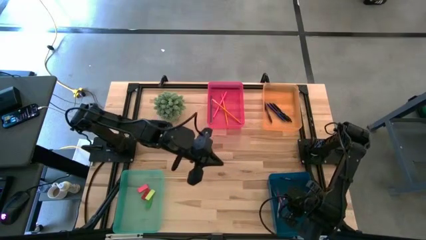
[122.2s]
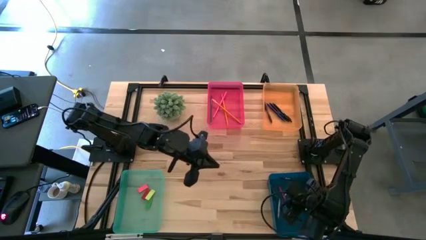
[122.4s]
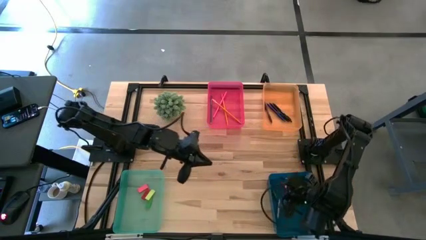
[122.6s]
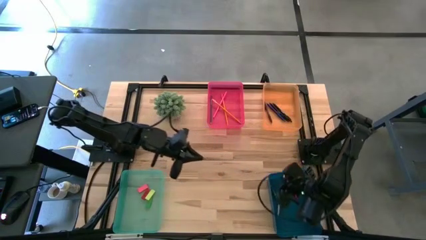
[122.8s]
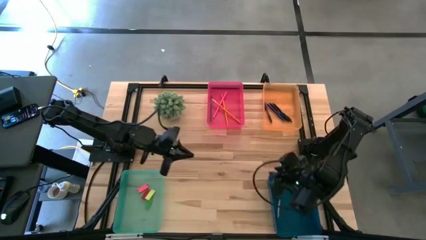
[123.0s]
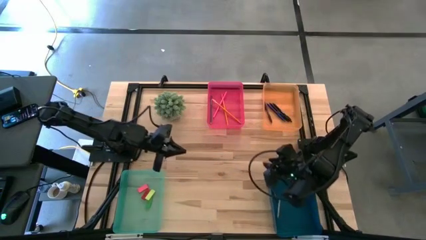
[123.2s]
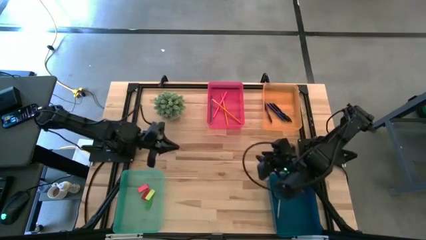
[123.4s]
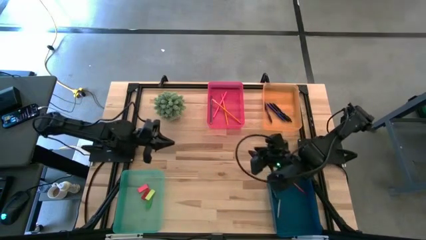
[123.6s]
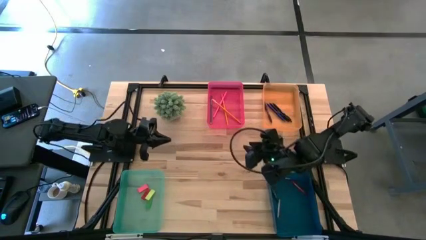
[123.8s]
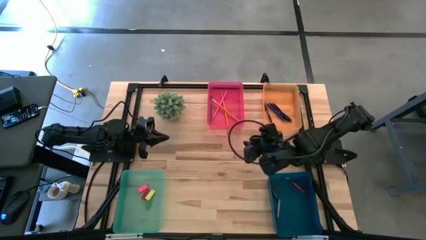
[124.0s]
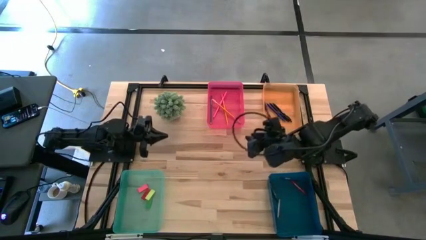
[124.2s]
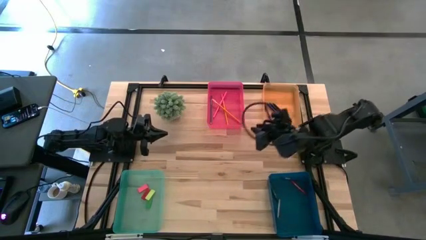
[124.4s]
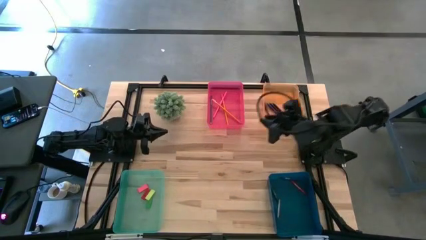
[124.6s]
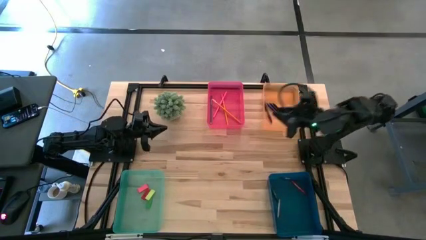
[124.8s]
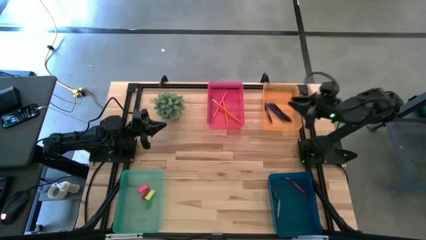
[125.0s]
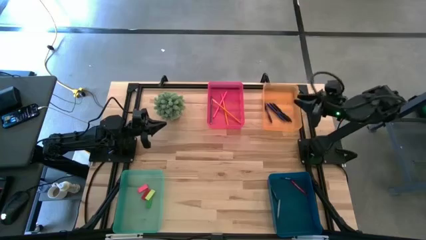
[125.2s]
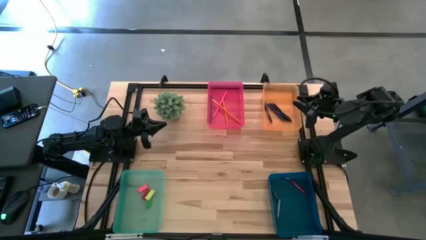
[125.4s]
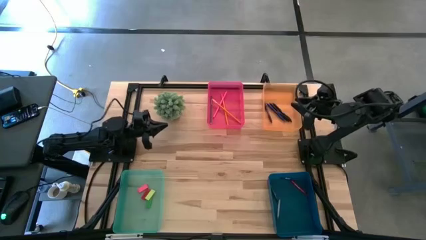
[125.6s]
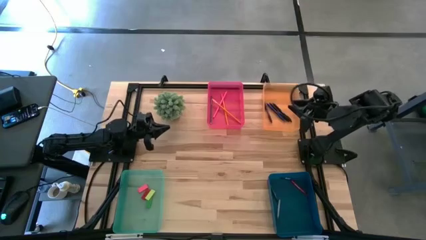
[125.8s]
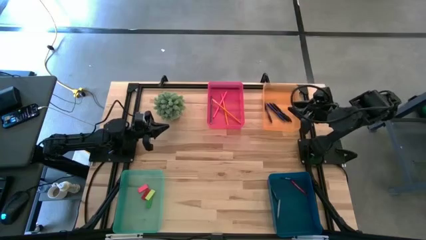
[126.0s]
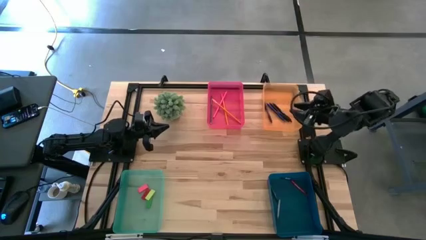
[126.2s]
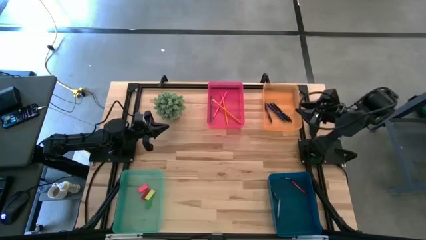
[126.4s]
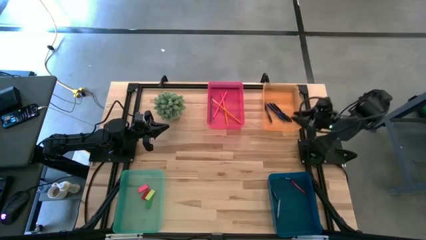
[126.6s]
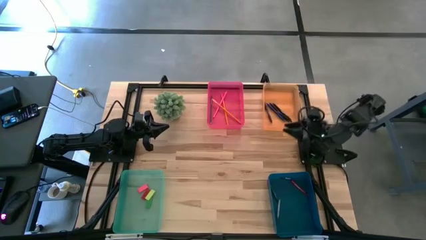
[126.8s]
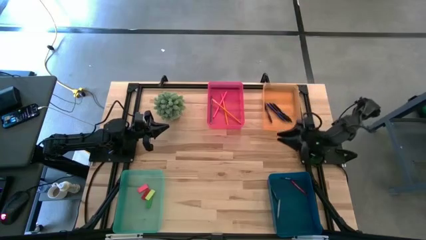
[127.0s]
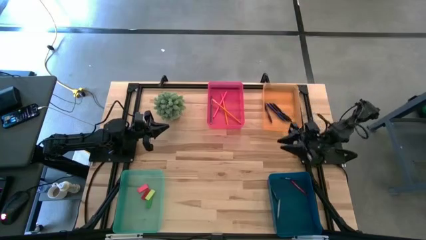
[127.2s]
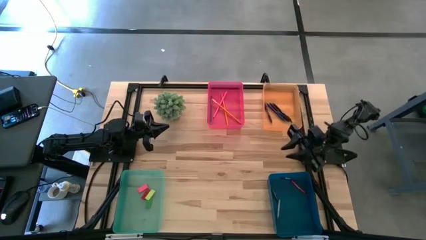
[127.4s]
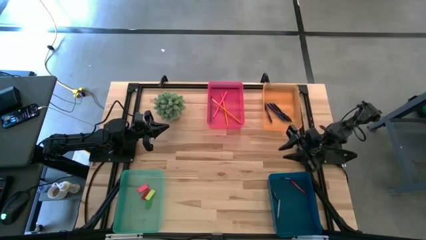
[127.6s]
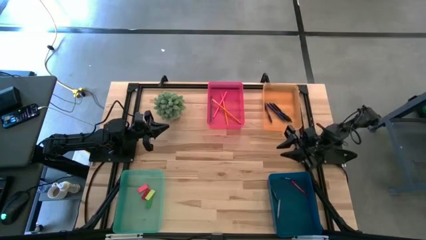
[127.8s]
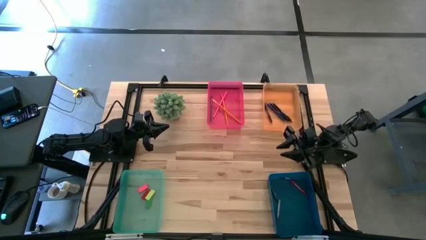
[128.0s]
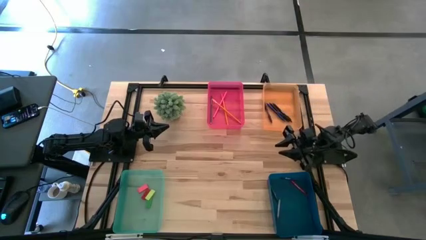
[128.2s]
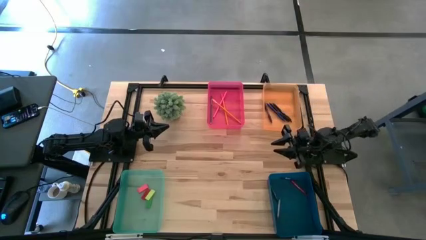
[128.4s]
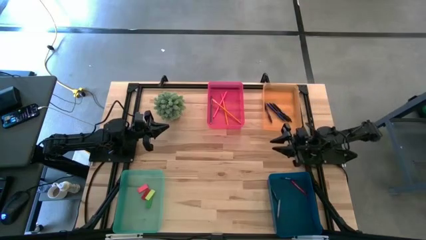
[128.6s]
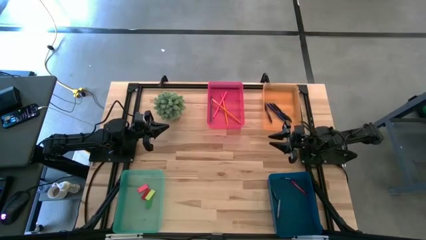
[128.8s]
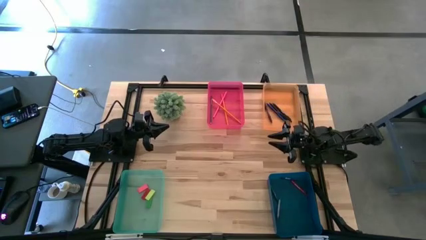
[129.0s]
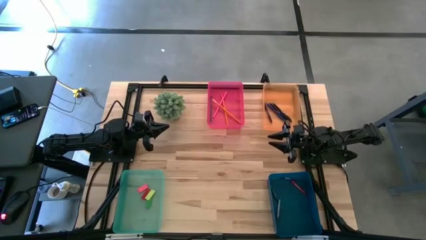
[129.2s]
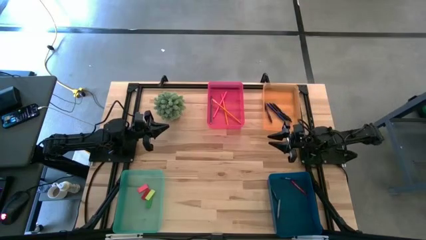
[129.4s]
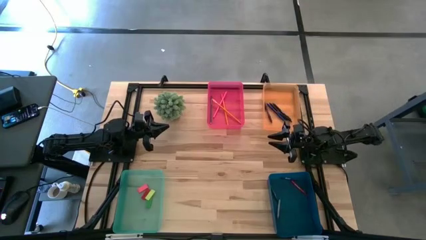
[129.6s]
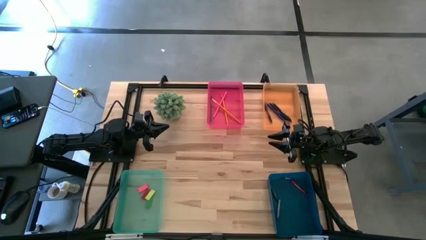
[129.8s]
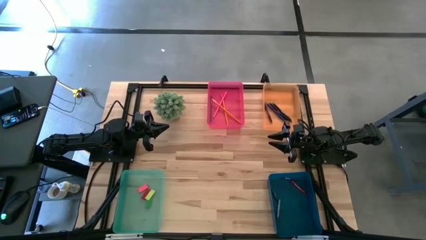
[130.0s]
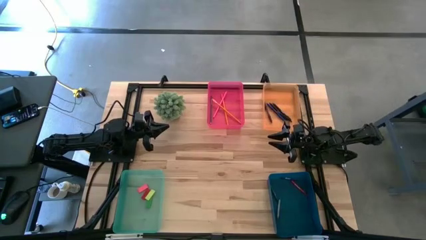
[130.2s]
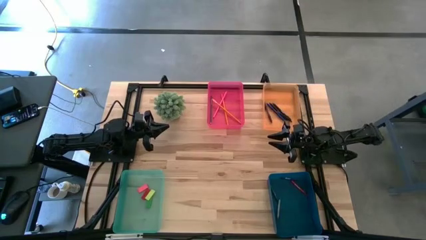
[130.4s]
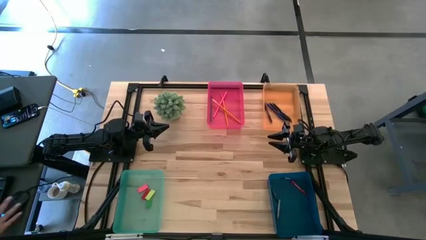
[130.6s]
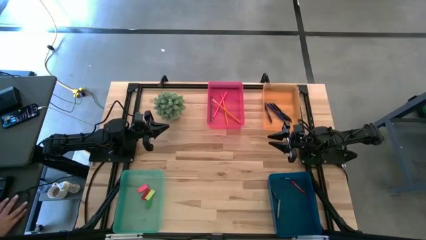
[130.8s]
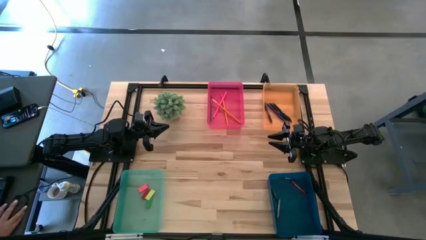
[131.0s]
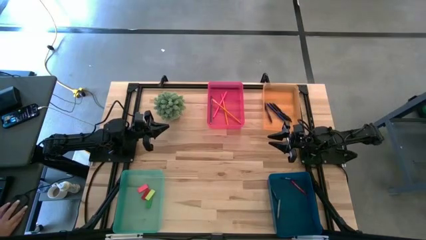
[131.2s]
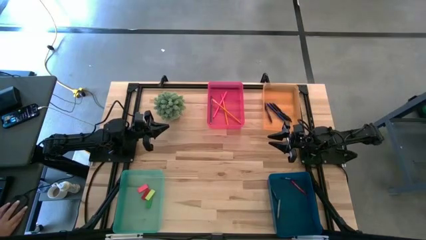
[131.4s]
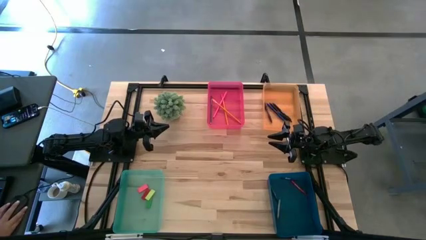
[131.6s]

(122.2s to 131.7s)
Task: Sort crayons/erasers/pens/pencils in bins
Return to Home Position

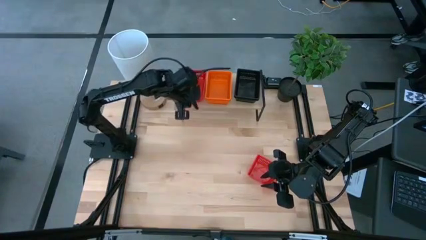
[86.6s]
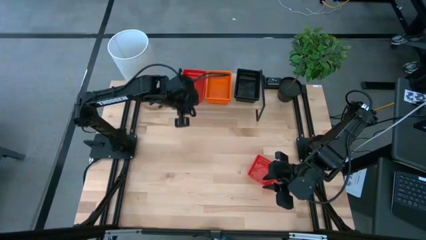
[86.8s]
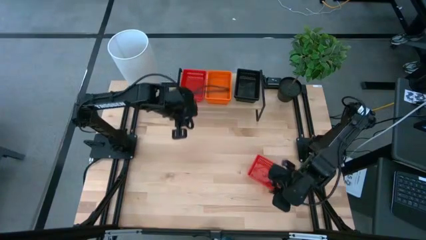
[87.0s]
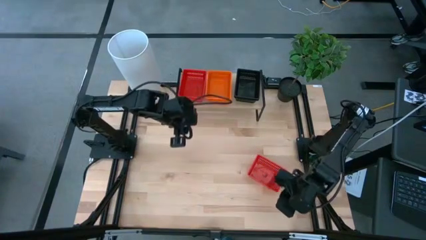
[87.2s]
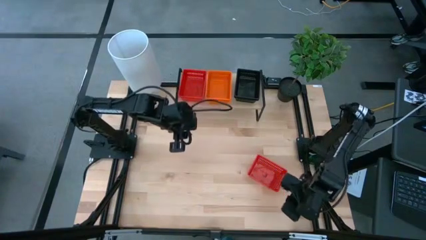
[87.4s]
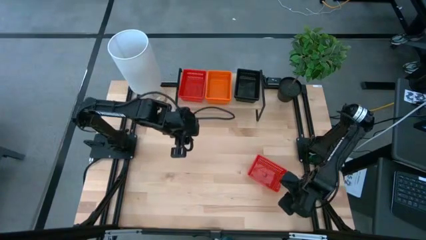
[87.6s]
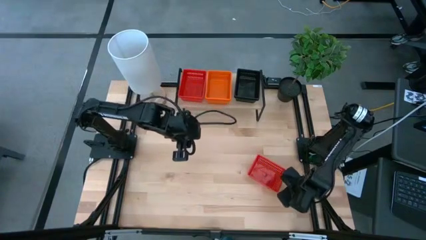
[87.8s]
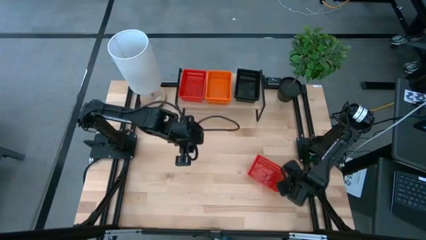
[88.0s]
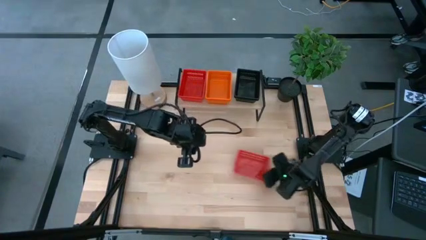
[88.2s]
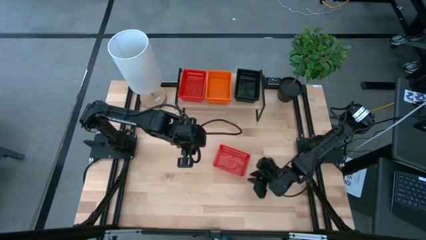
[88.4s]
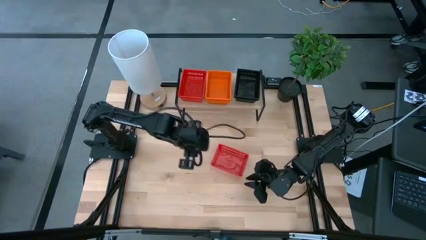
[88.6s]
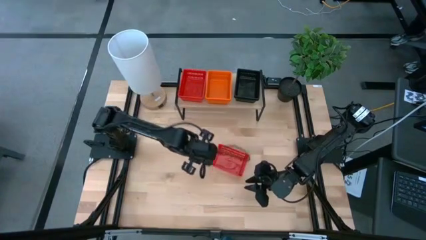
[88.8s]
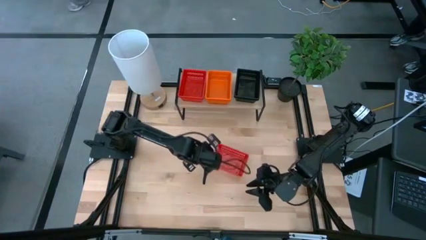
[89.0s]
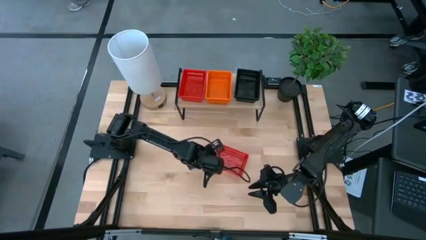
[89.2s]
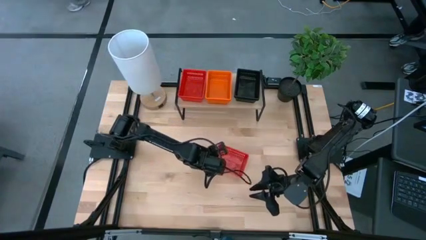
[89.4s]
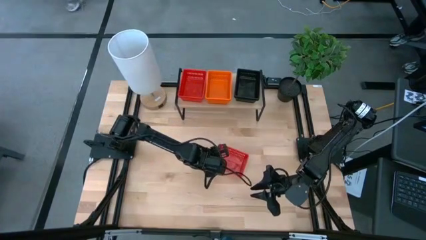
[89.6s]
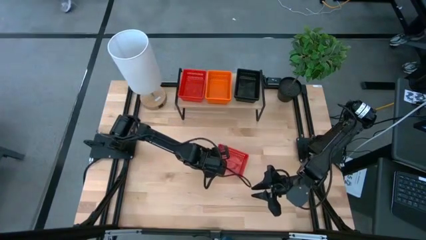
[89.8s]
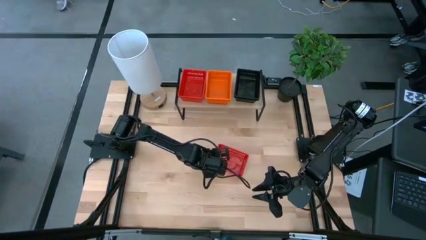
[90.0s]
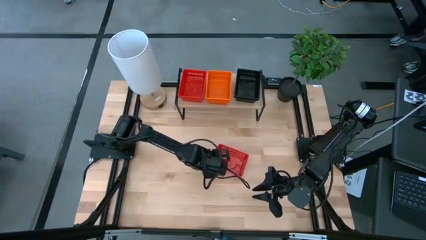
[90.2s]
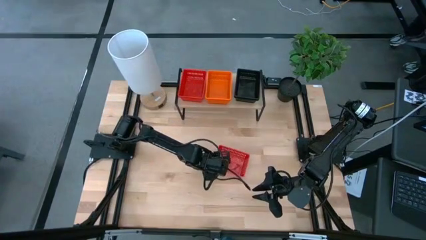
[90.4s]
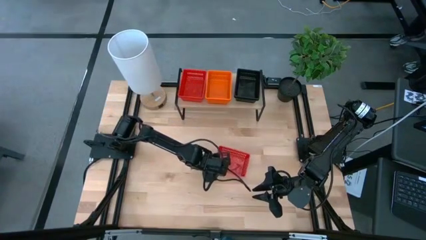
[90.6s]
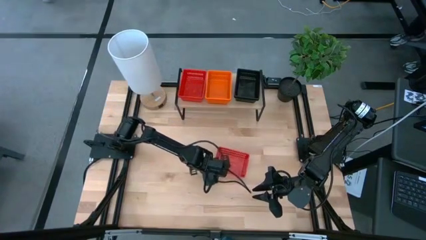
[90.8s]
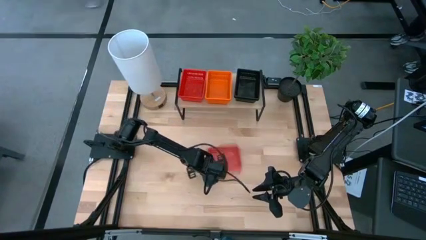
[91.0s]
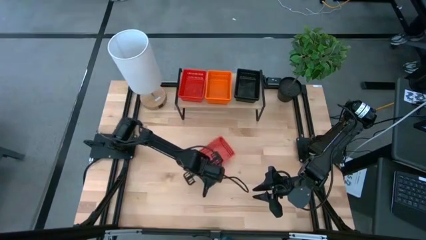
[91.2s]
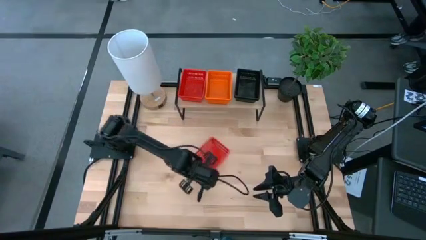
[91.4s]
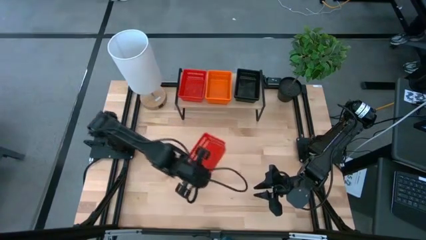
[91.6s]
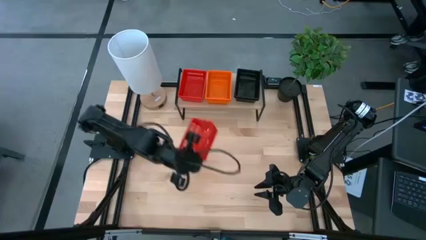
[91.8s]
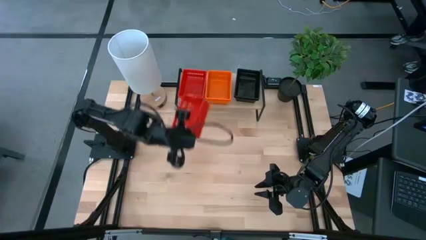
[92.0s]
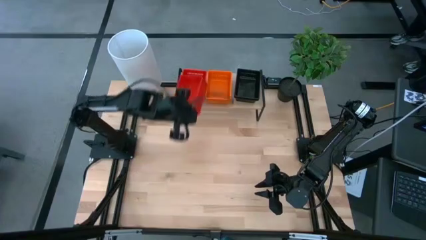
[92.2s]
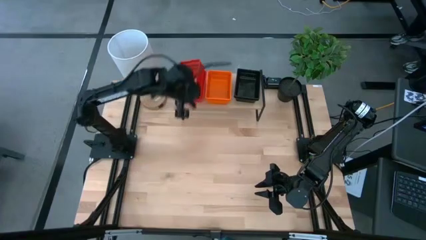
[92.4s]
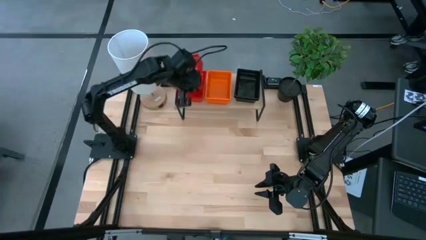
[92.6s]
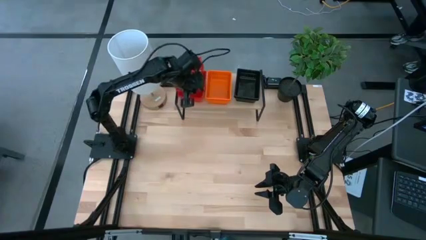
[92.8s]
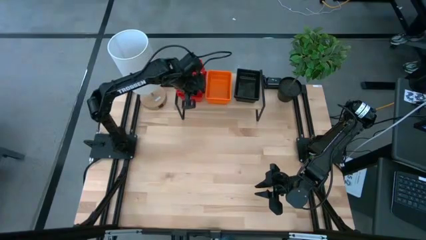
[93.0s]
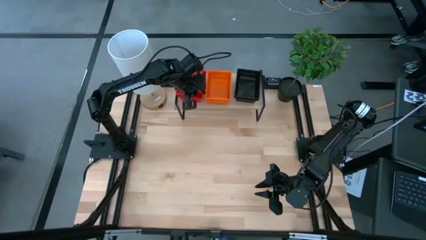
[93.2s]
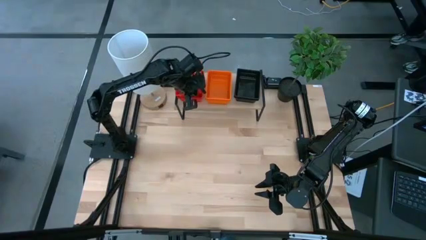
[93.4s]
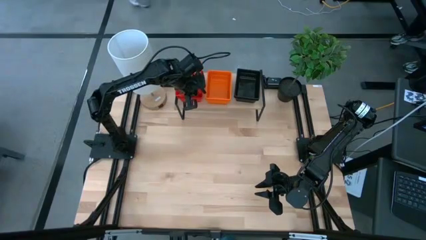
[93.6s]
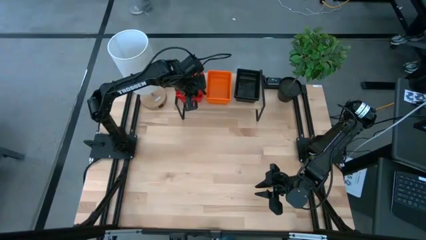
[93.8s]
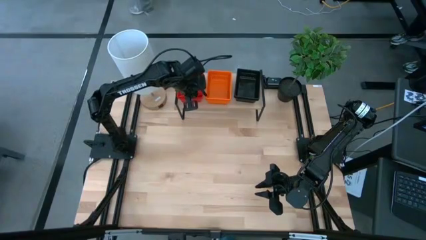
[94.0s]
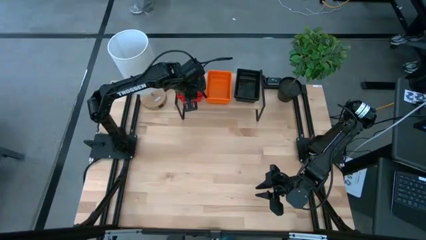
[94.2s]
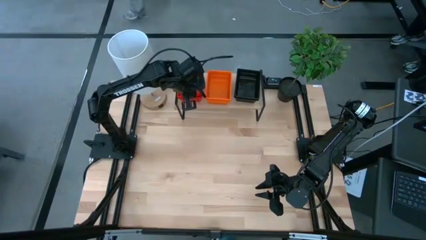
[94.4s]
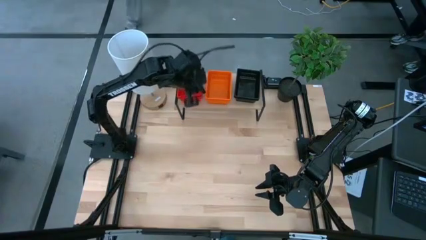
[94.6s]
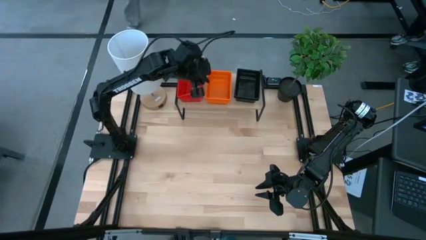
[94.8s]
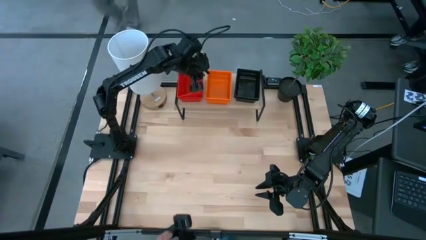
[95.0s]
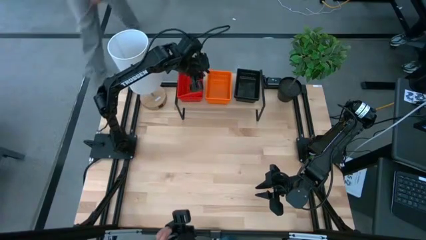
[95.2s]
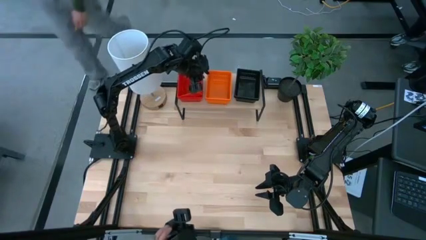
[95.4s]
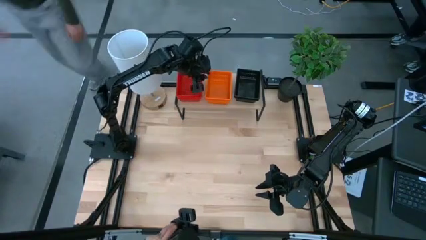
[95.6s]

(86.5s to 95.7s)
Task: Stack baskets on shelf by color
Stack the red basket on the stacked red baskets on the shelf
